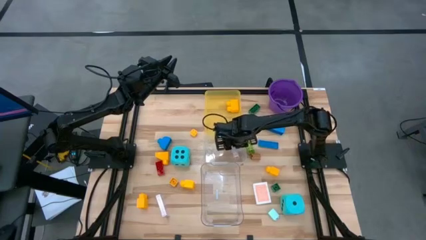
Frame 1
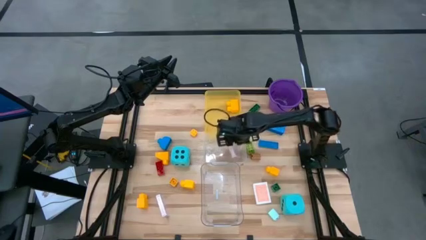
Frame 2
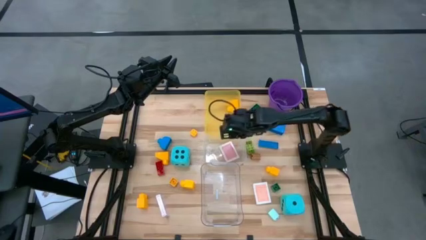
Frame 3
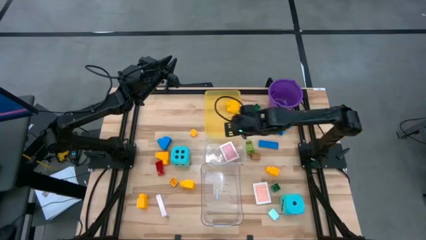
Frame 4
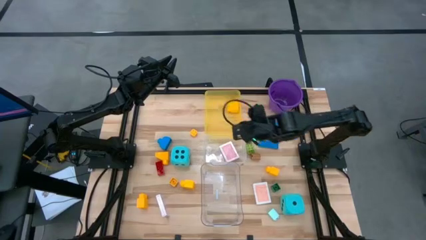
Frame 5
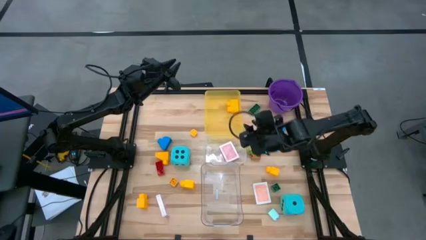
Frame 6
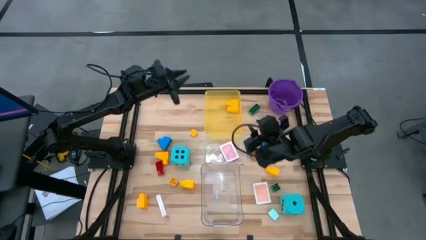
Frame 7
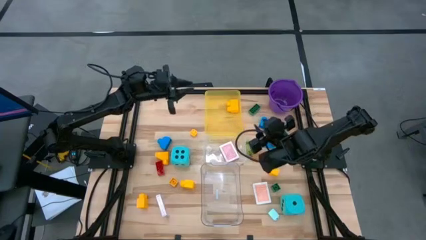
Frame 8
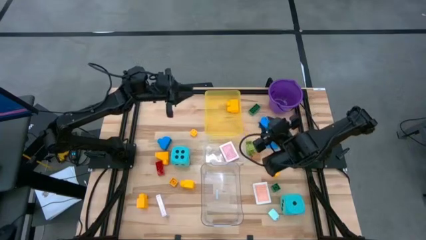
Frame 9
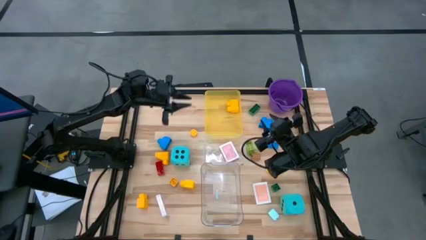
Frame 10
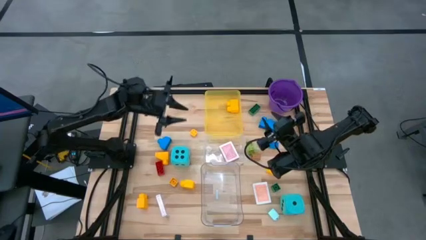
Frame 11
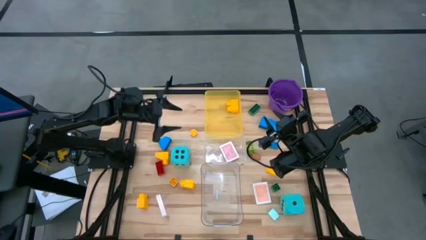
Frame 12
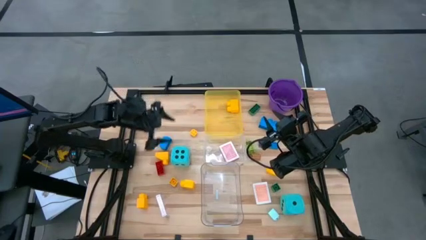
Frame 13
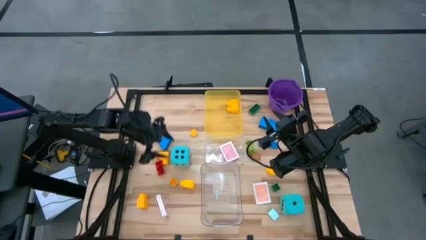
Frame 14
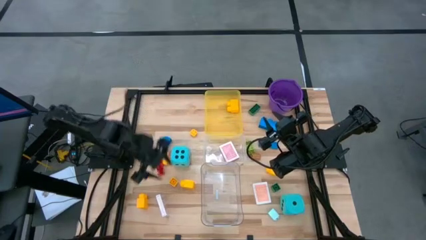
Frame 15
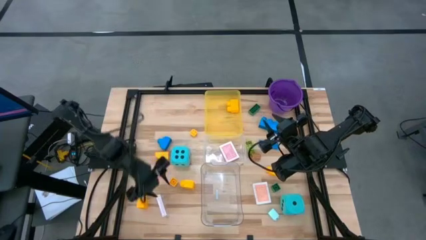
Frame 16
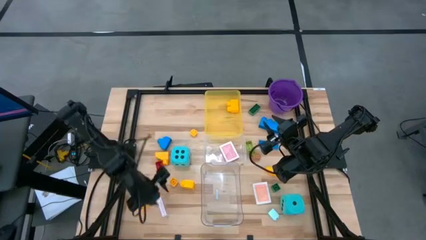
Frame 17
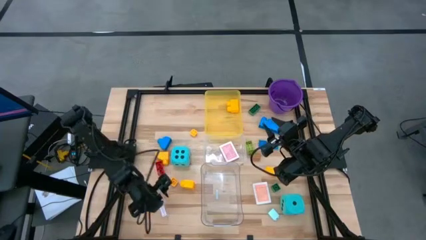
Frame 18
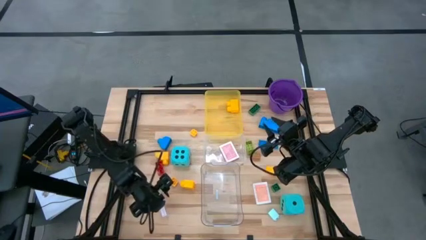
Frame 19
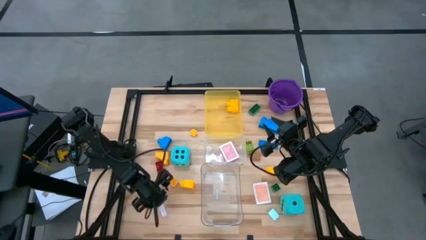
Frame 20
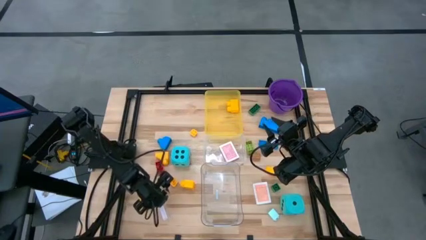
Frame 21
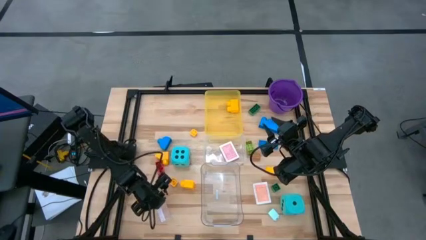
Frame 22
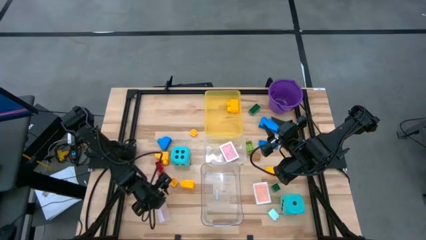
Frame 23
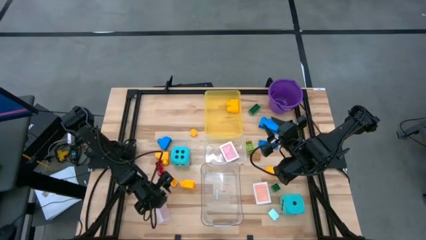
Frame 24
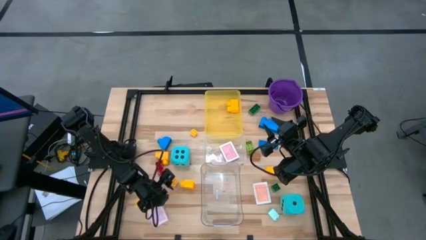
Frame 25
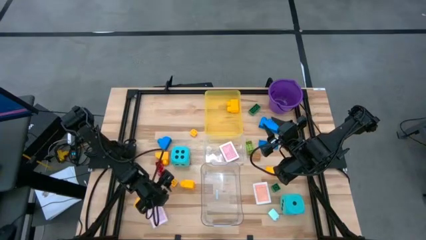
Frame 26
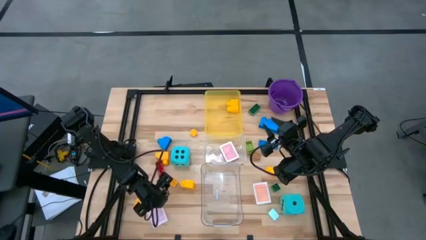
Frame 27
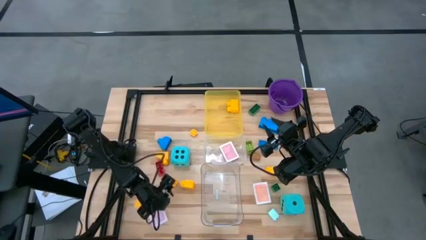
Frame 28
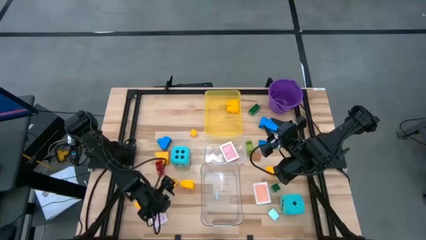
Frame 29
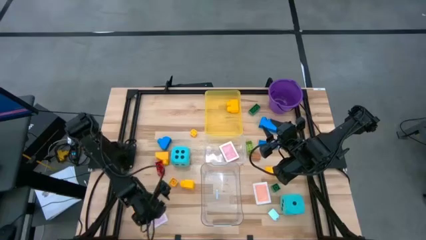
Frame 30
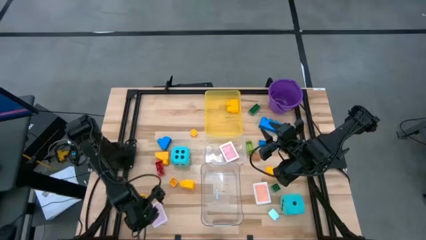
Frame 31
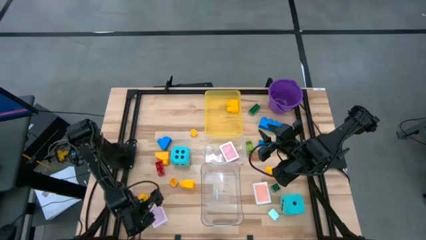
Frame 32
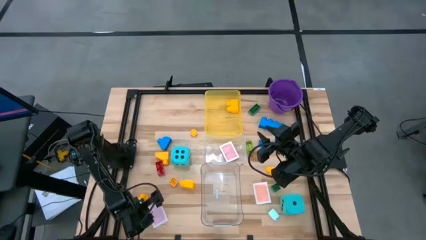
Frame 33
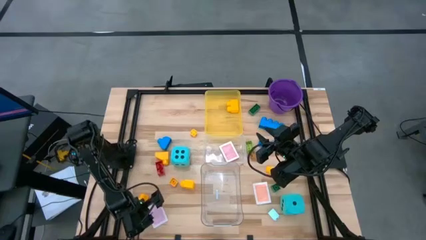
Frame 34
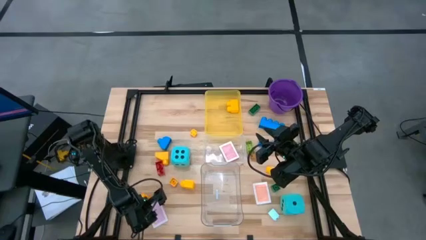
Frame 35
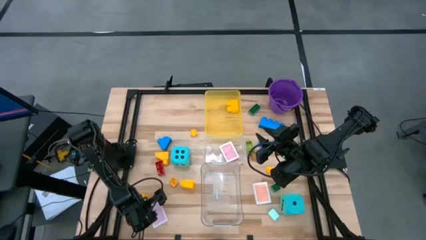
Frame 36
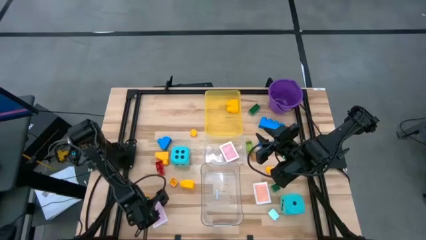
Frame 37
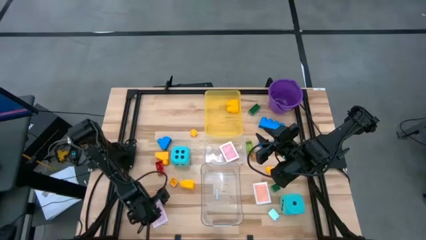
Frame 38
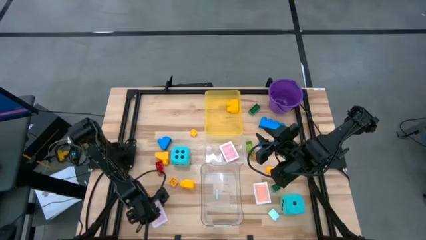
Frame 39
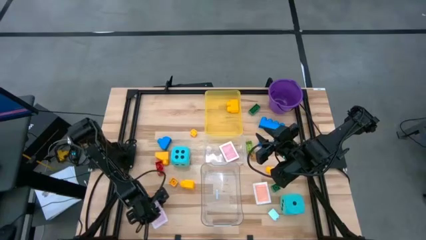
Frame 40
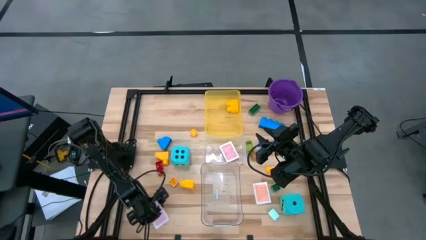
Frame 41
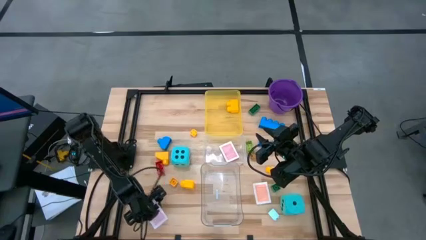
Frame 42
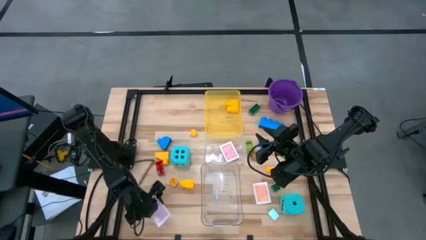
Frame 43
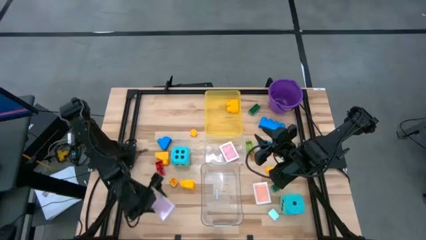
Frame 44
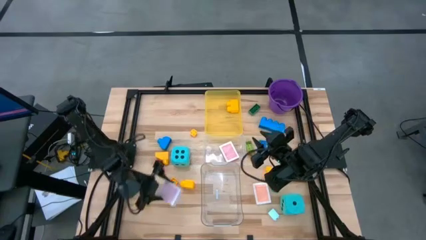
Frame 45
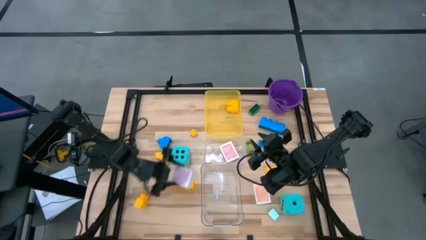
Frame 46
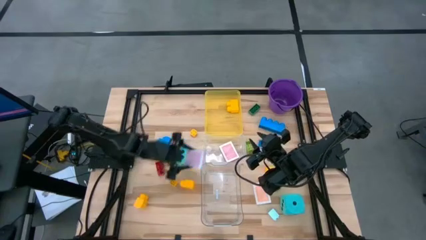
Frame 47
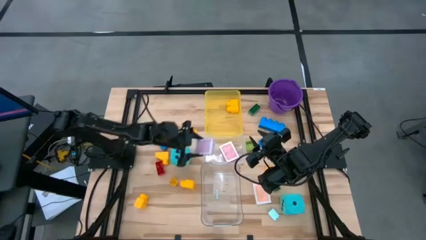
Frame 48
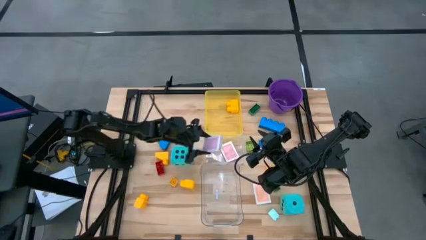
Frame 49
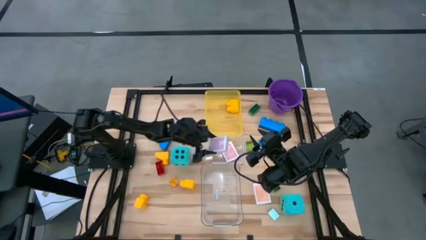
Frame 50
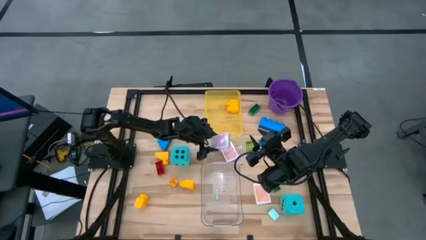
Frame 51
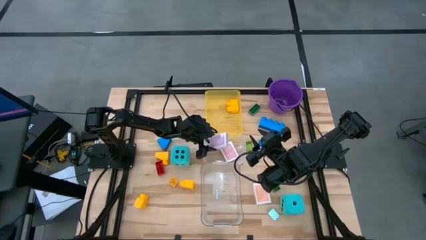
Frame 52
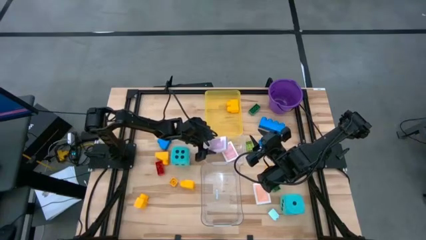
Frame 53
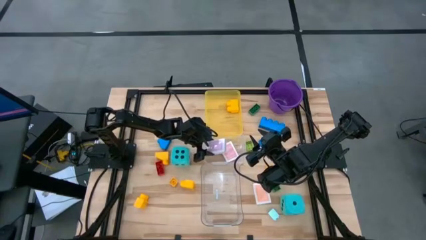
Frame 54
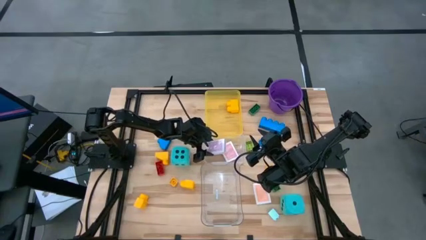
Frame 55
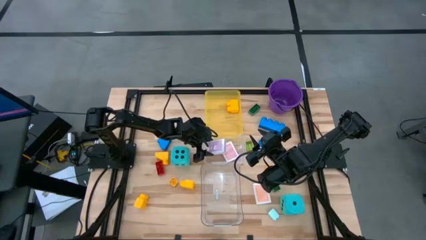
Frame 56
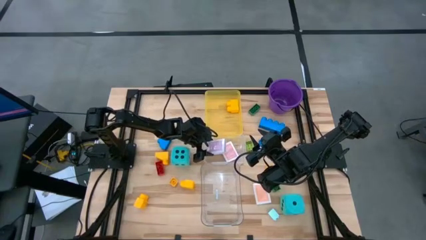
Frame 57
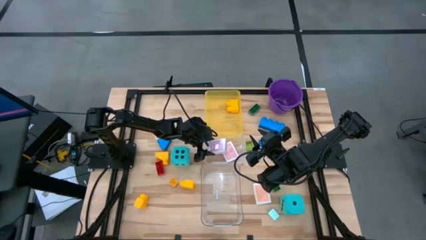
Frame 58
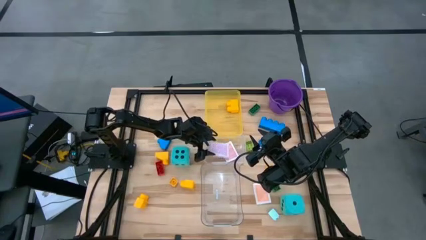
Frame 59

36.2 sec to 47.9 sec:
Task: Pick & Place Toys
Put the pink deck of cards into the top transparent bin

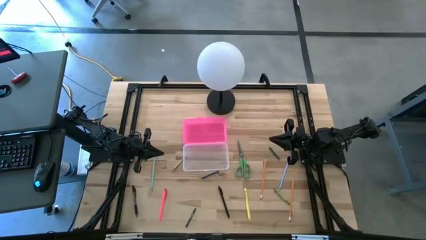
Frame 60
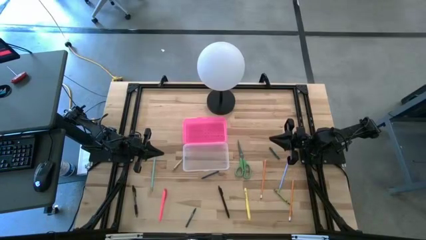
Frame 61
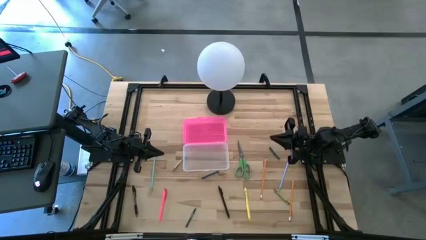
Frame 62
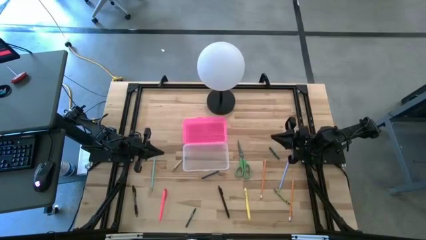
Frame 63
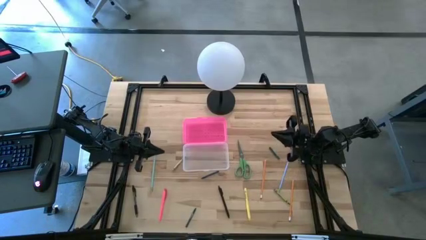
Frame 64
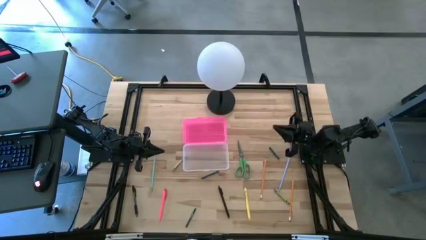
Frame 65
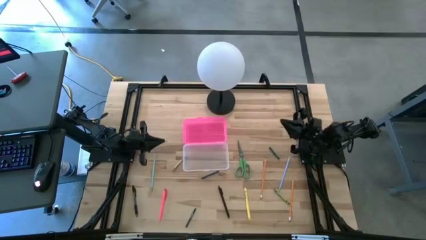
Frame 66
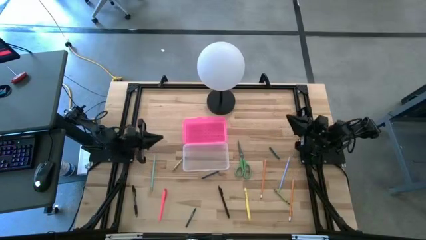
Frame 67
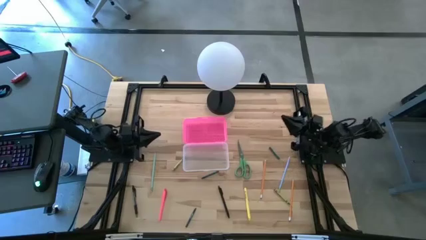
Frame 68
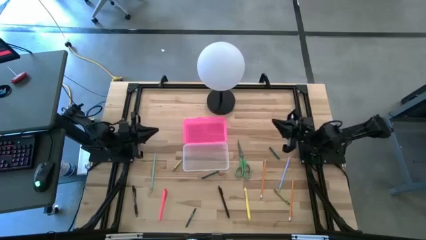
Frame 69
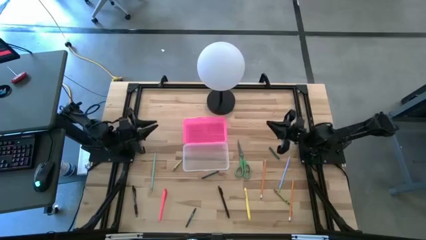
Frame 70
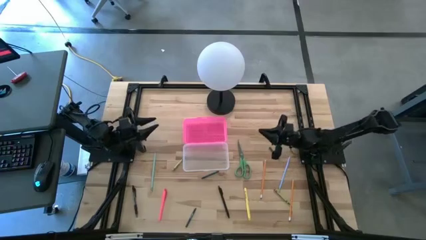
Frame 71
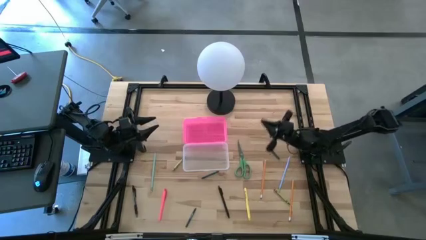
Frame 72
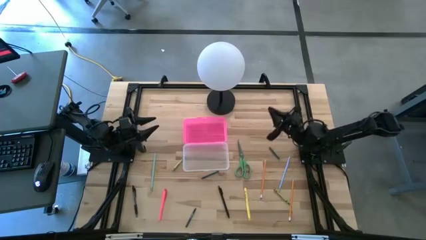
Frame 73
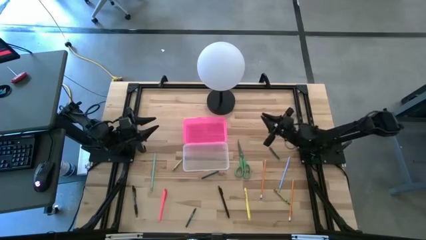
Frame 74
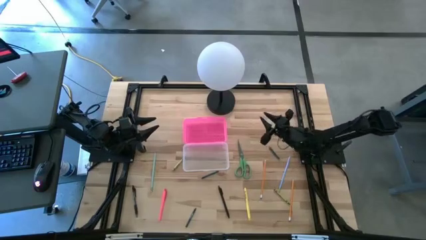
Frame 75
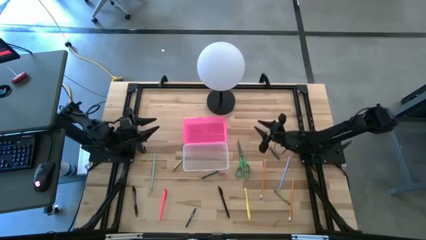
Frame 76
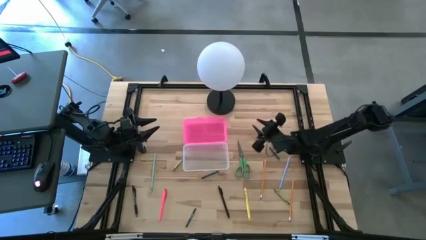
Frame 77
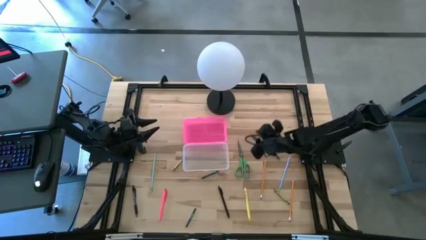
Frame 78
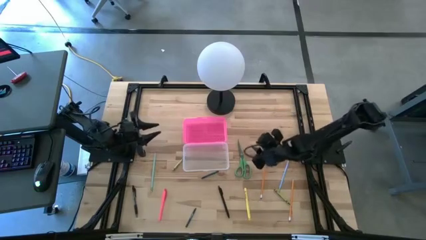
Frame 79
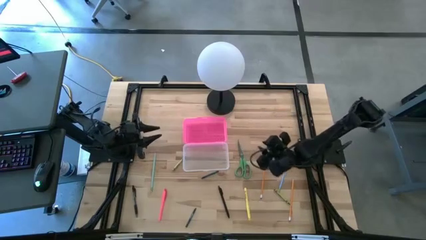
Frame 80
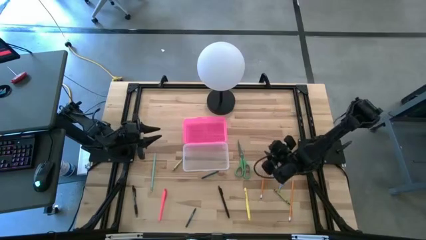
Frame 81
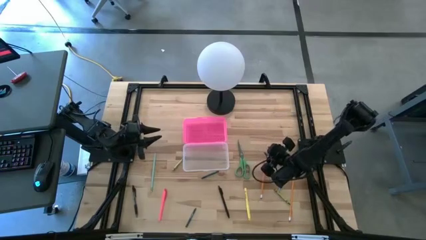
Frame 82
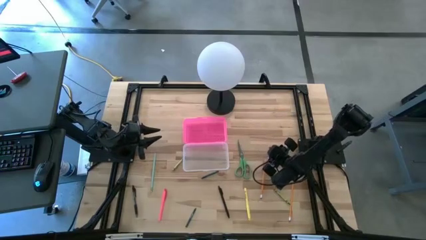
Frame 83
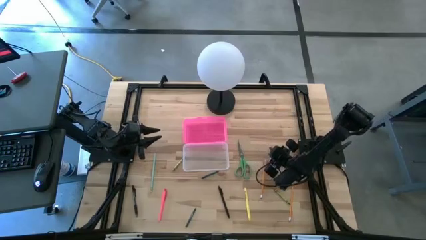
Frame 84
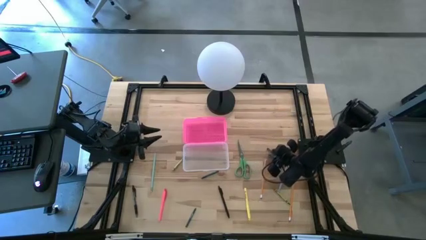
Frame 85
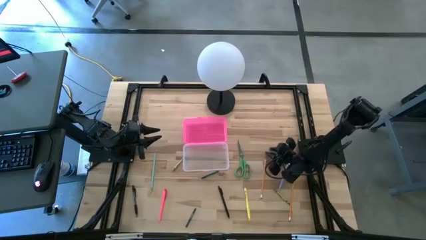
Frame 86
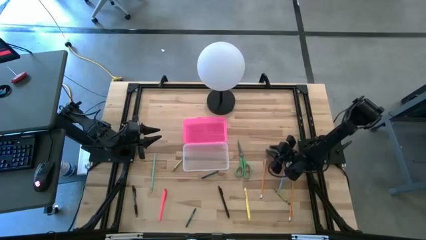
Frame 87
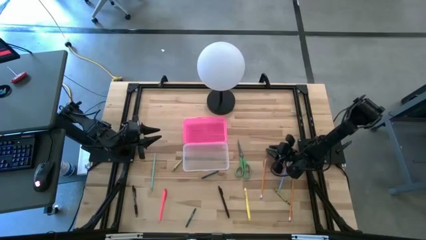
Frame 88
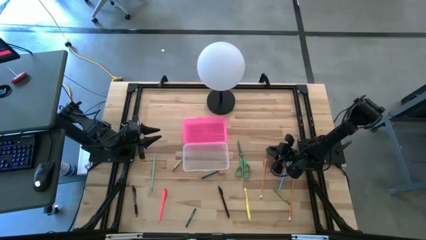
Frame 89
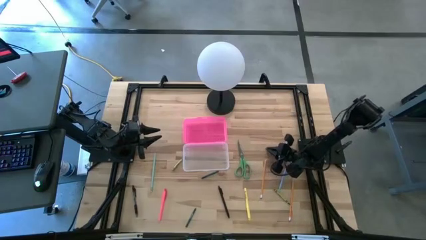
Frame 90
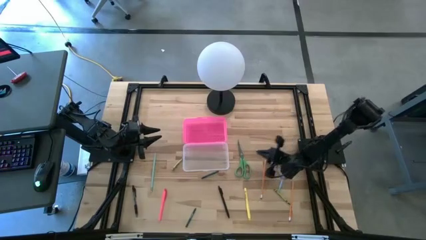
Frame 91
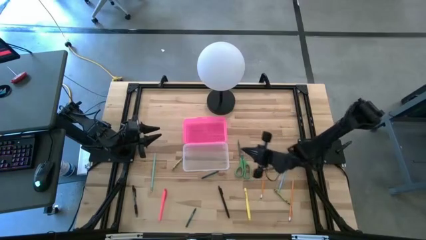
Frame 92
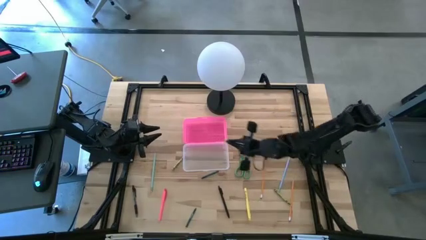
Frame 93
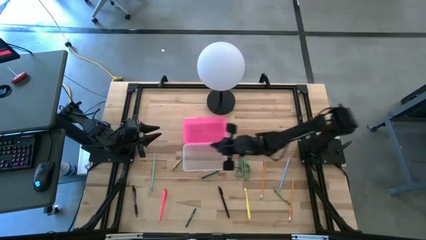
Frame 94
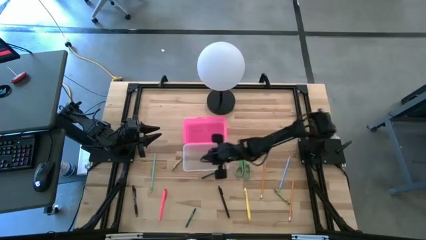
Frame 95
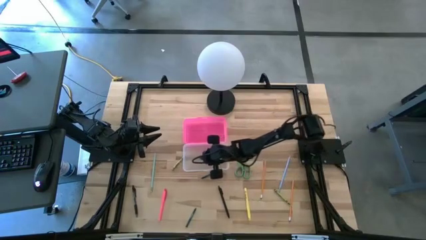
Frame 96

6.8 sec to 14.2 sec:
Task: Pick & place school supplies into a supply box
Put the top green crayon into the pink supply box
